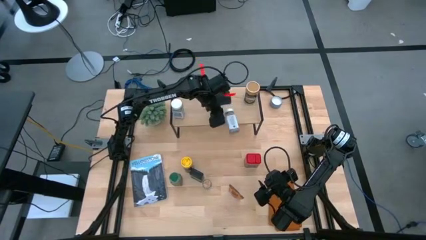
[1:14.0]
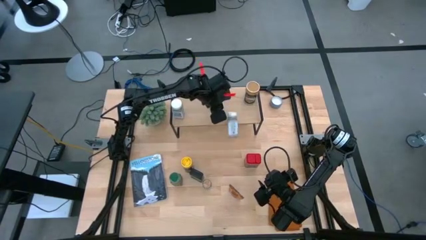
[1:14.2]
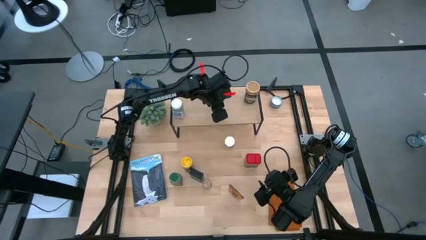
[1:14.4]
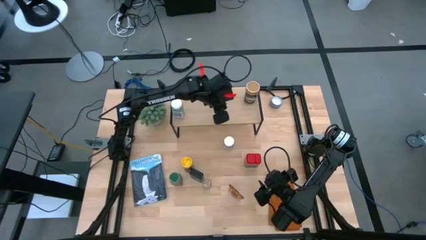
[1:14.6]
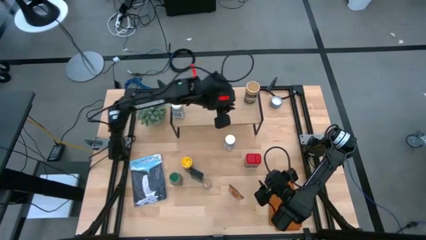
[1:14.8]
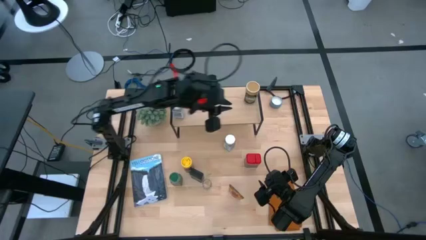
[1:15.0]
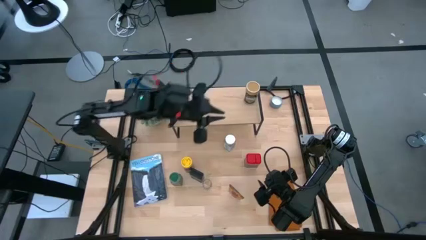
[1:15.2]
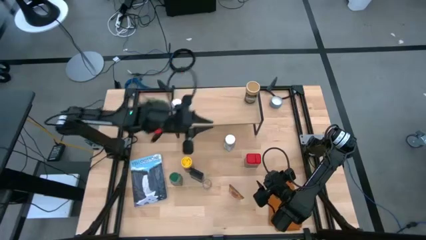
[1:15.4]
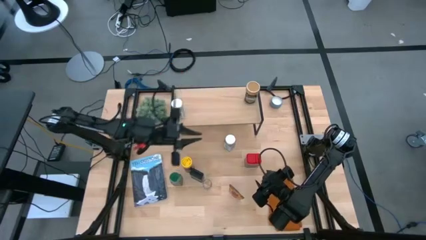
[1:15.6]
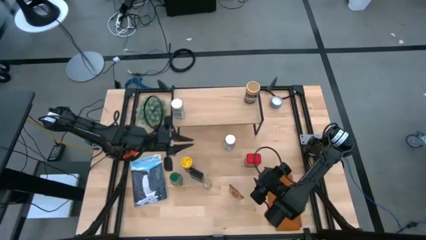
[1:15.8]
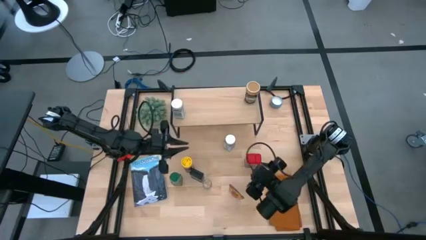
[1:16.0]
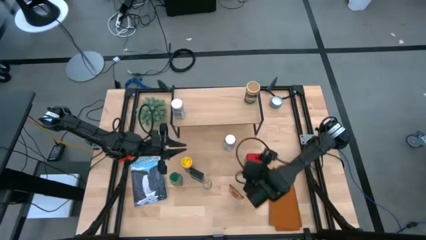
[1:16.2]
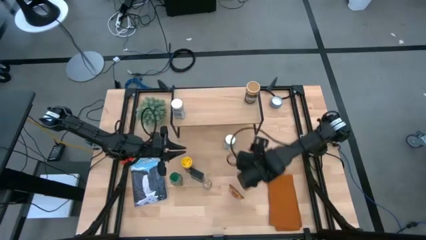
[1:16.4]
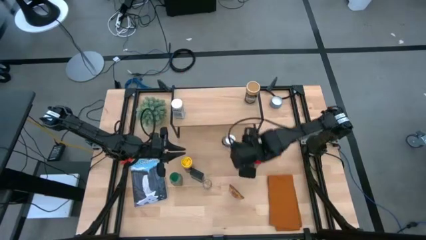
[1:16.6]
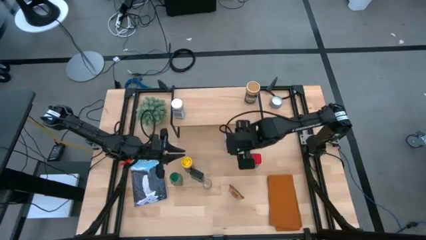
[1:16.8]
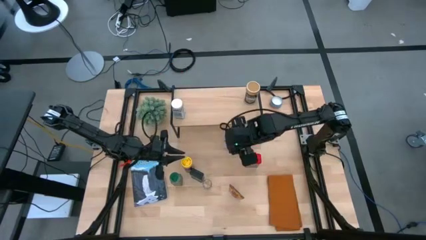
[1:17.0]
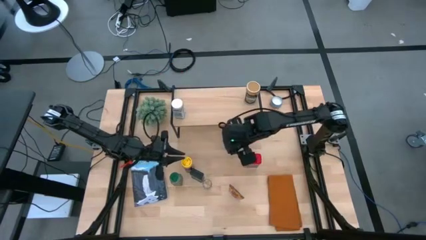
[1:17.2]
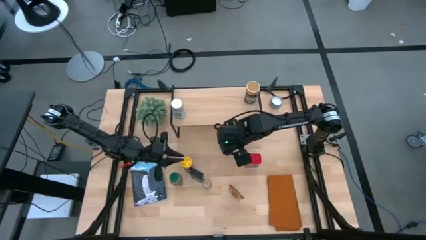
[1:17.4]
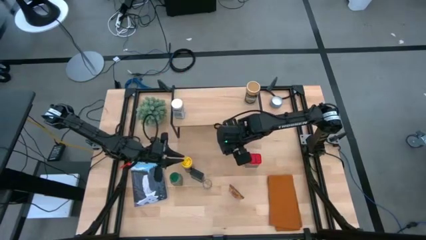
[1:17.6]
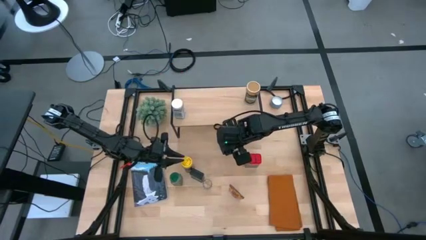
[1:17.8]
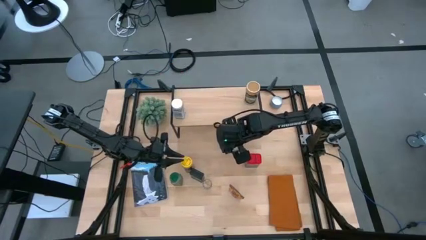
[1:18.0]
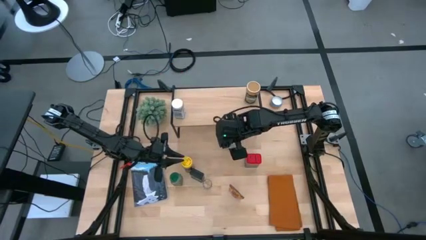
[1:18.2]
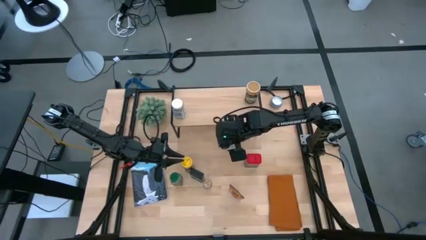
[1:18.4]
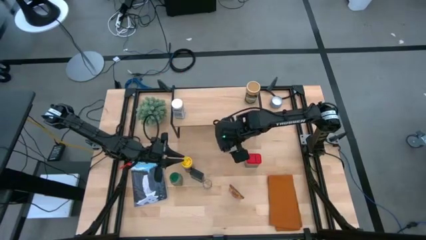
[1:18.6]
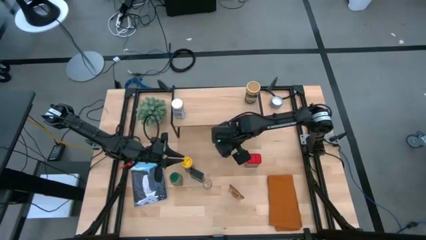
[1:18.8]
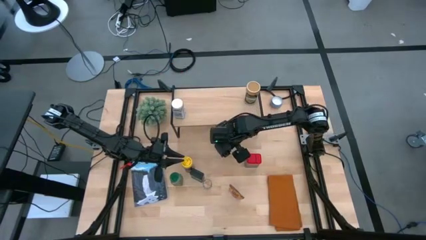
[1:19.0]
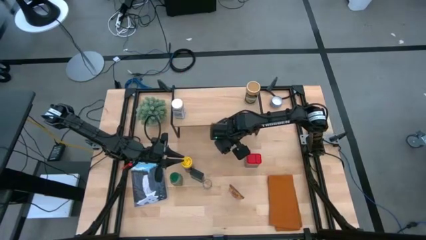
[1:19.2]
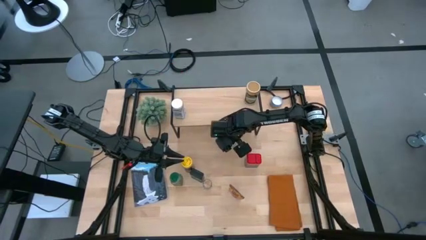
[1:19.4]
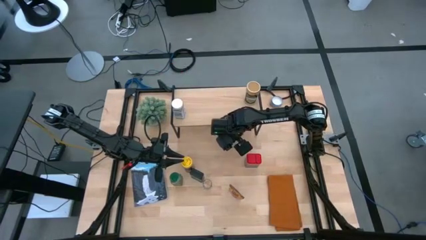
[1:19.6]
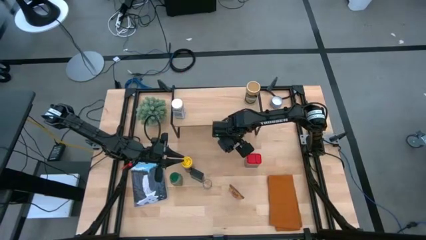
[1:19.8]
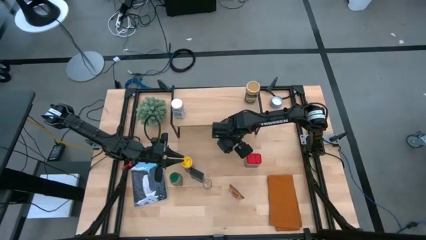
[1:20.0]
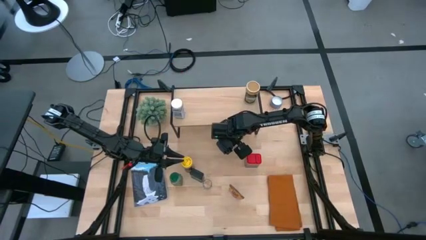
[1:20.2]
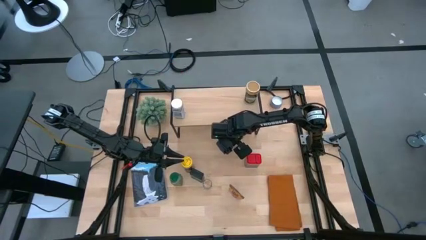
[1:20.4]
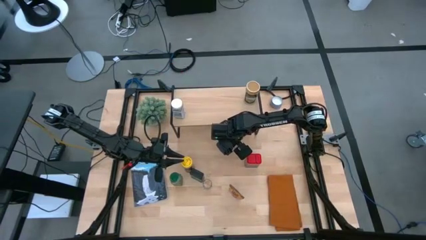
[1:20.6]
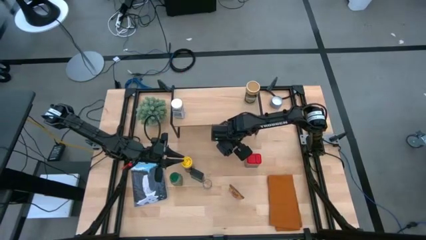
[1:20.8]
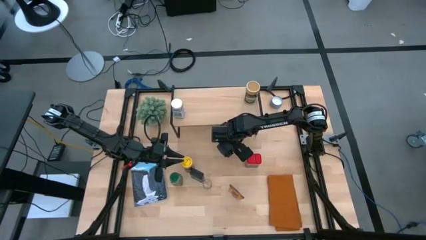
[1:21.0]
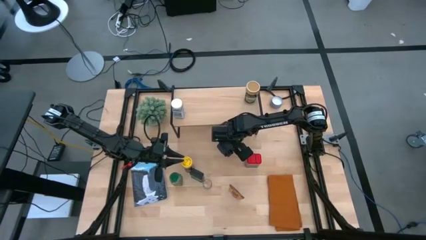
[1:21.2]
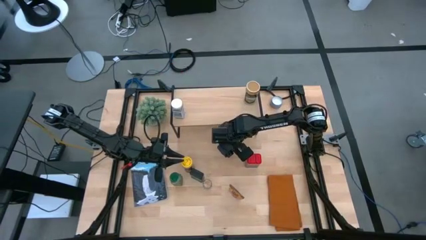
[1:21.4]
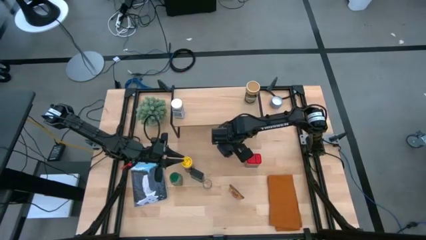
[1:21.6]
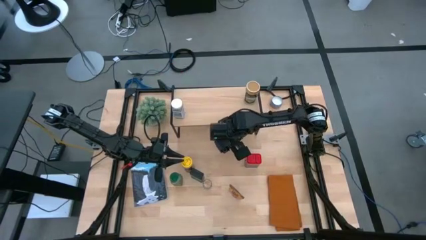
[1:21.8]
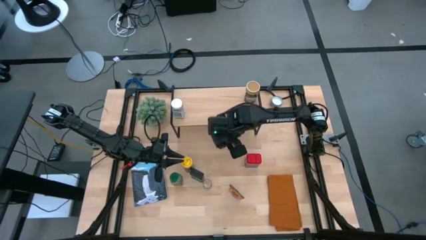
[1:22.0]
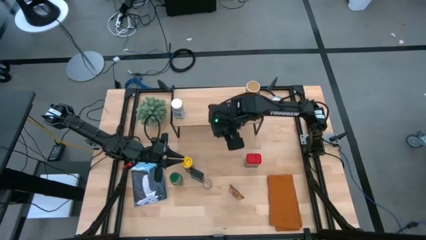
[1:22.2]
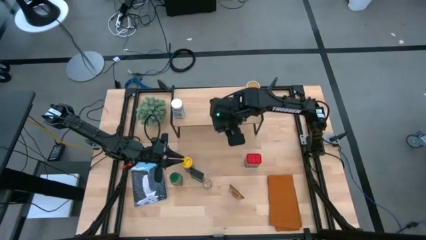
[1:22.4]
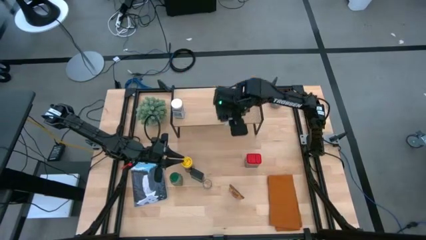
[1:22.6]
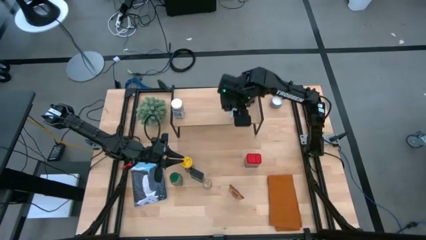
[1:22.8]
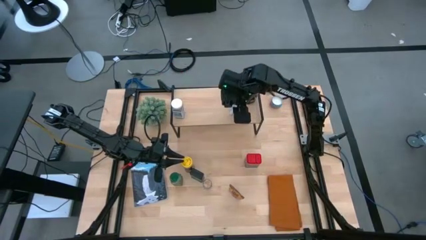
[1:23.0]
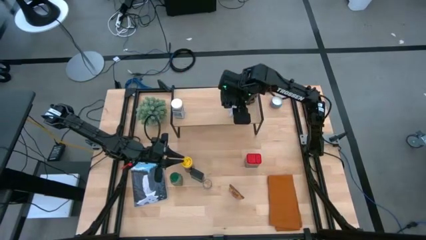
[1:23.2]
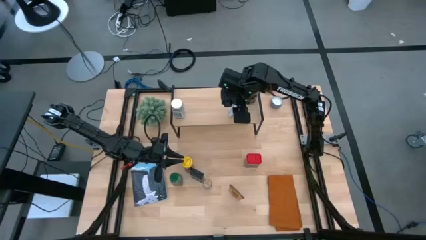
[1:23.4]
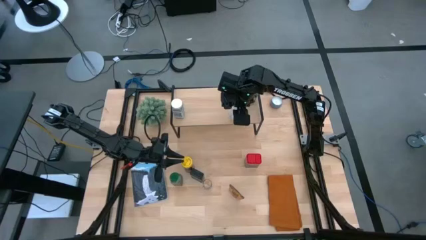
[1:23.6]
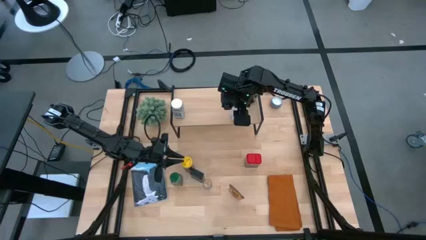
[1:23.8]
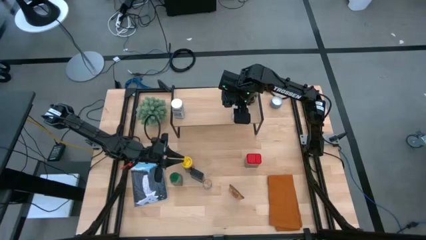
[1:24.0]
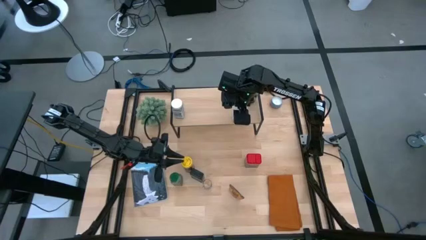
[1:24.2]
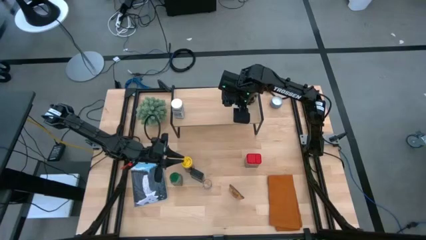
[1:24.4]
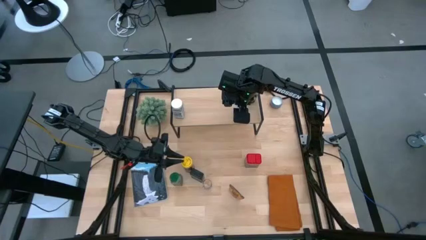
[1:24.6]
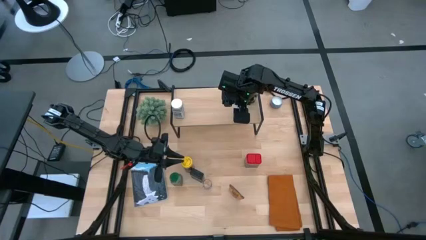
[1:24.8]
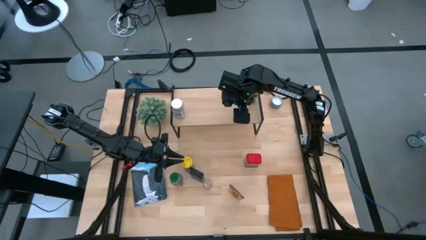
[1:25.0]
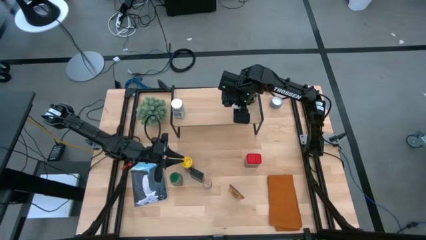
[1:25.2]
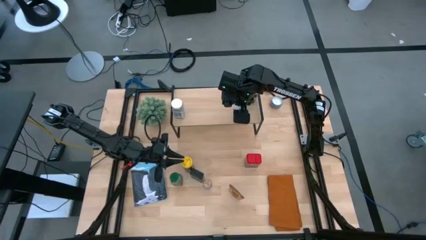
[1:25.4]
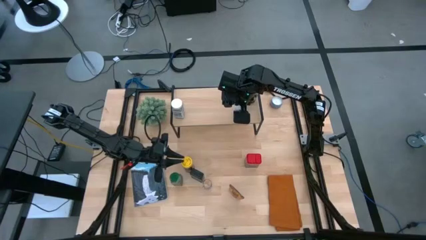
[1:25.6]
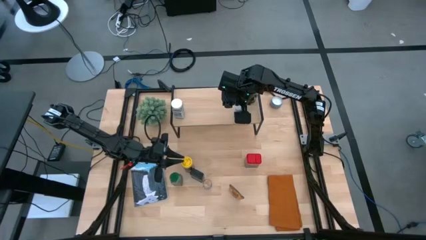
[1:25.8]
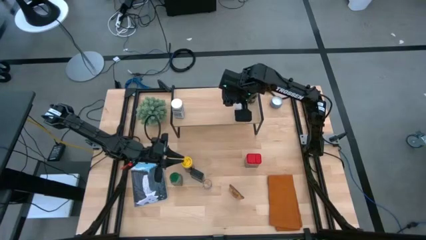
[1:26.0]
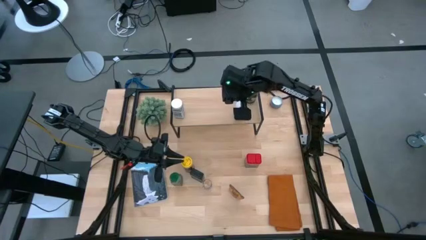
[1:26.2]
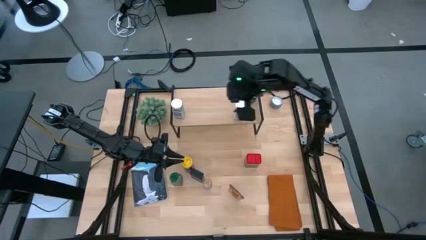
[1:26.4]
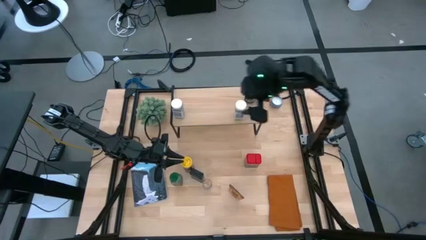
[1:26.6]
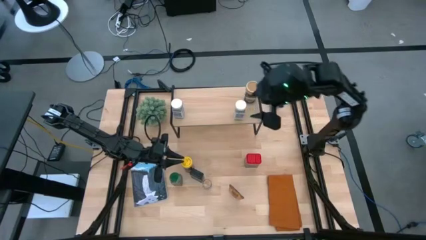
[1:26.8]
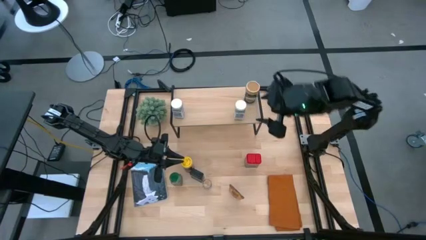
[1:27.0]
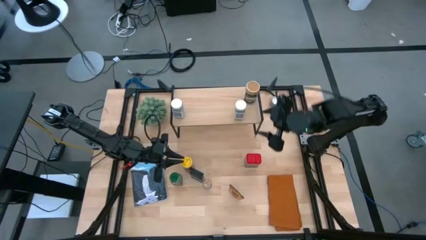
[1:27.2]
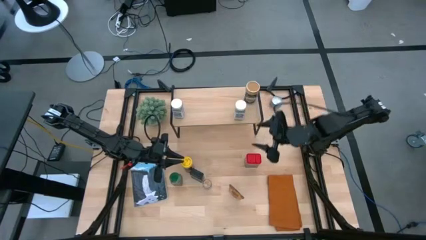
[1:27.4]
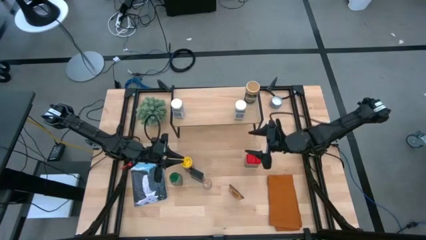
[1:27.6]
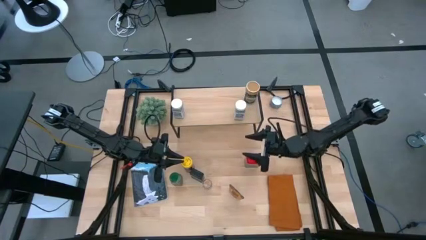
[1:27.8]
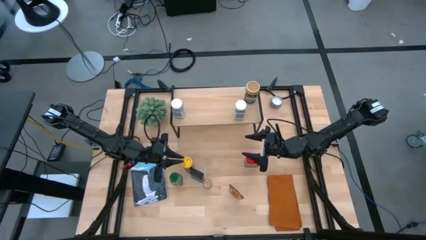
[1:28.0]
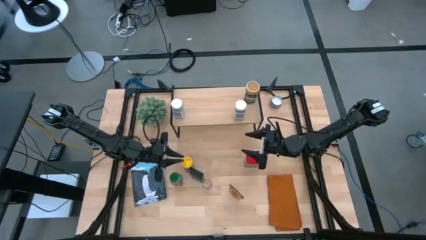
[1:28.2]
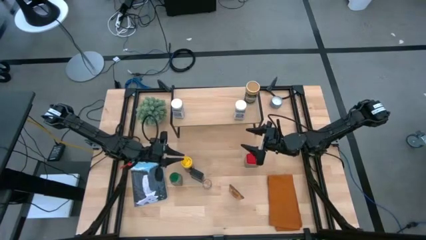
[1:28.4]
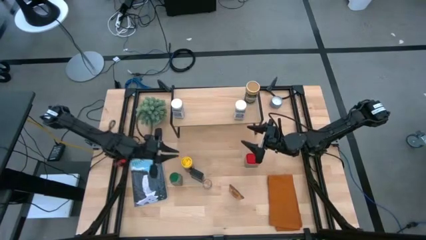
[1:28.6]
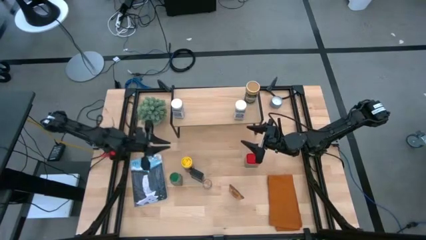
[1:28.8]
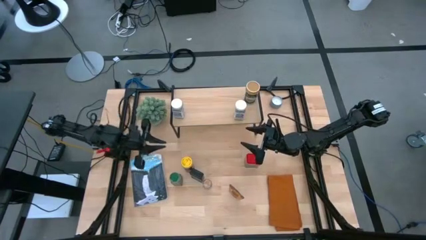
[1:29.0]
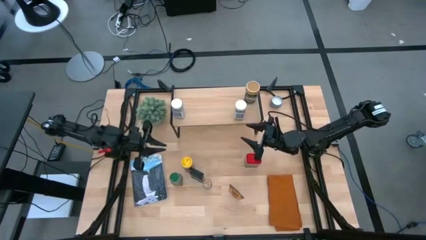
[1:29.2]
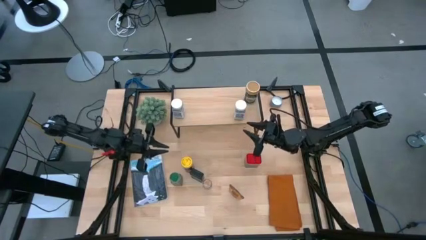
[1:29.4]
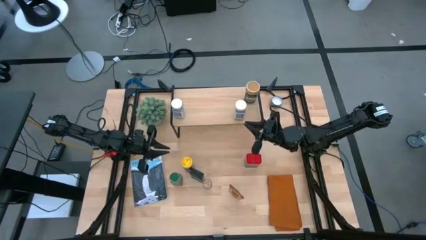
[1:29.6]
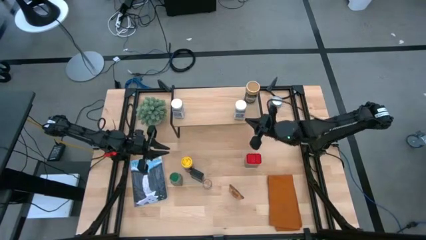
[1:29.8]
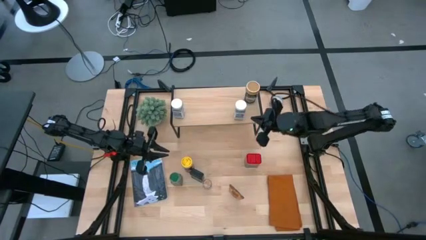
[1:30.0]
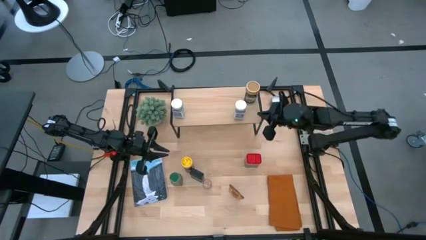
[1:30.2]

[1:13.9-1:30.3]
Task: Shelf spices
Put the white seasoning bottle on the shelf aligned with the other white seasoning bottle

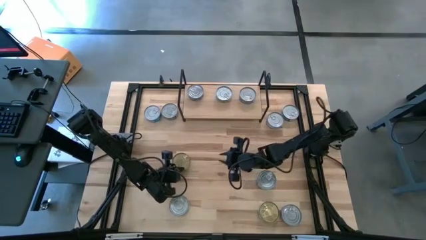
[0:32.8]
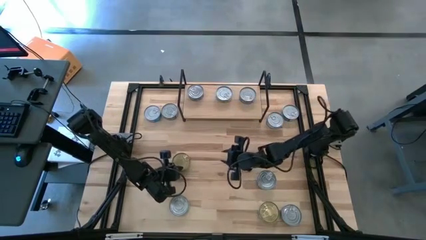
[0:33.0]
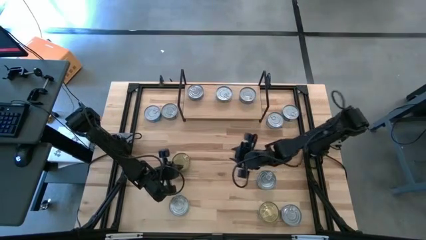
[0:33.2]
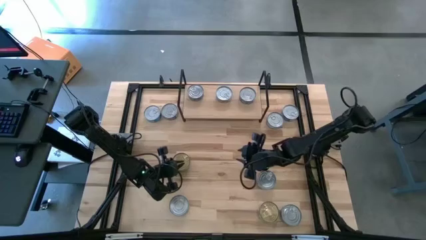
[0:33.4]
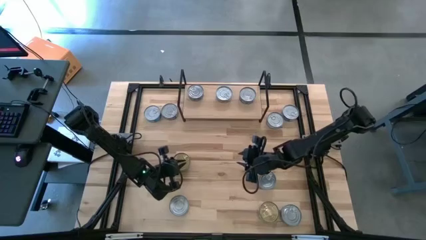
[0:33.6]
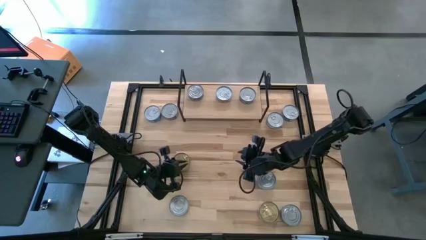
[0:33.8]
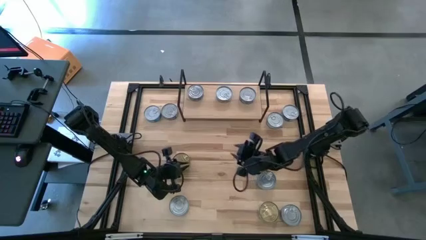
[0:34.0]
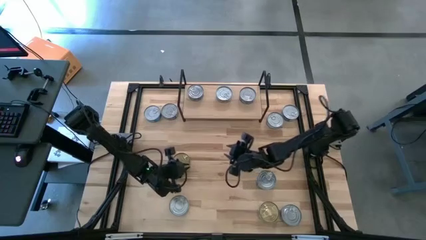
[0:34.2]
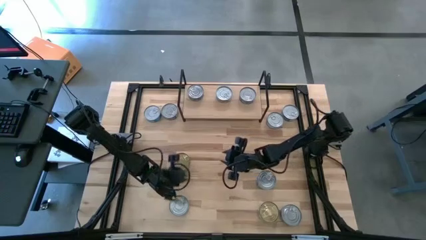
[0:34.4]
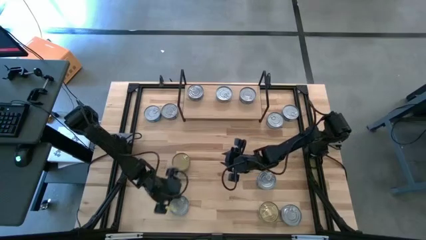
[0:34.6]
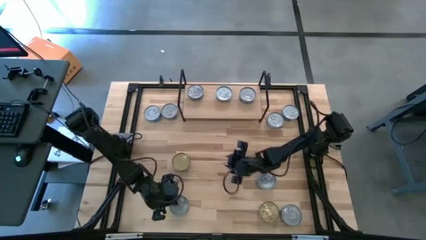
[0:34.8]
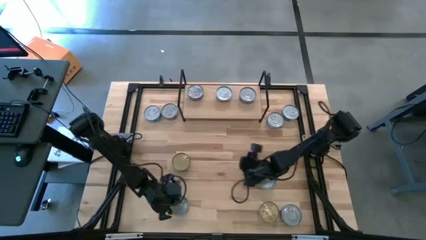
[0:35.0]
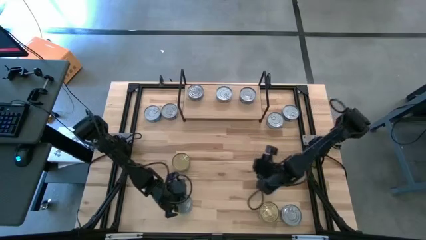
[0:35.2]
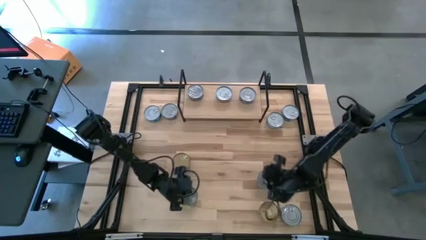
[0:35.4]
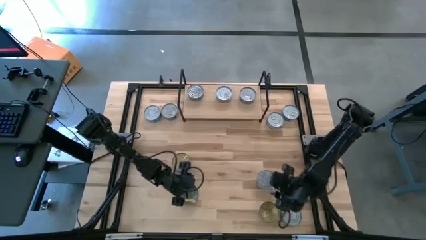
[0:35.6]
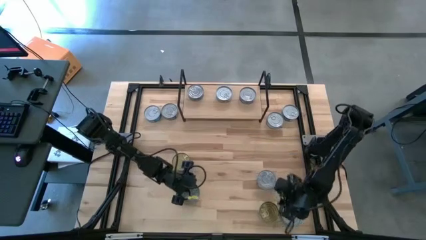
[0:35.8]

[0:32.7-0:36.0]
Task: Stack canned seafood by type on shelf
Adjust the yellow and blue tuna can on the table
